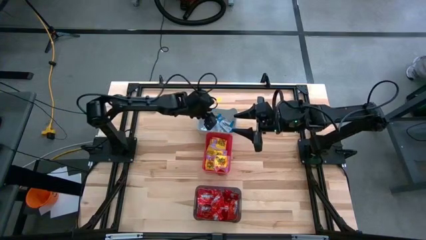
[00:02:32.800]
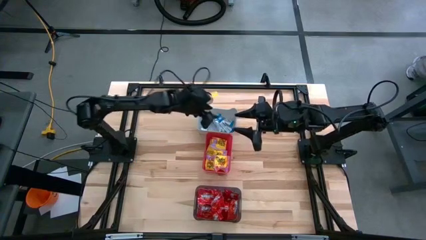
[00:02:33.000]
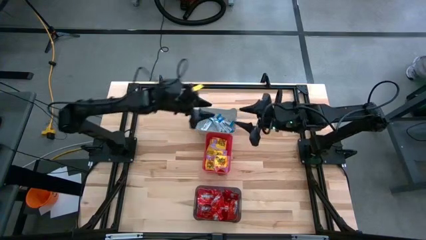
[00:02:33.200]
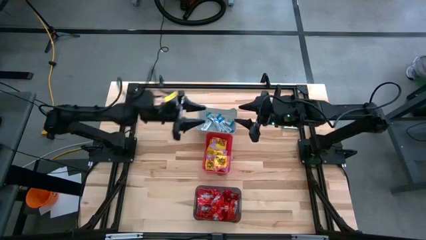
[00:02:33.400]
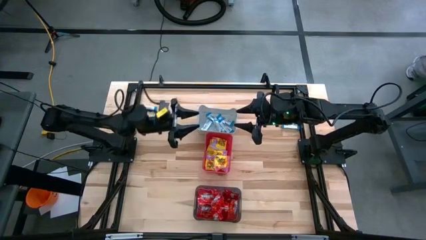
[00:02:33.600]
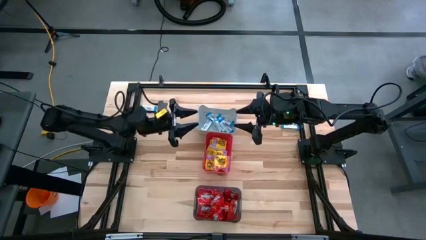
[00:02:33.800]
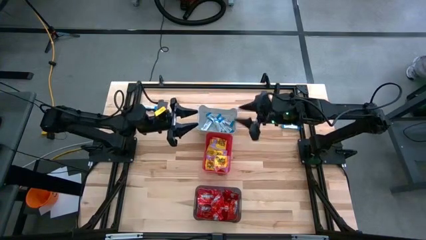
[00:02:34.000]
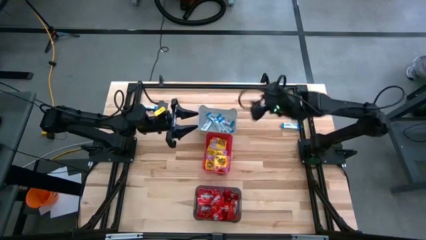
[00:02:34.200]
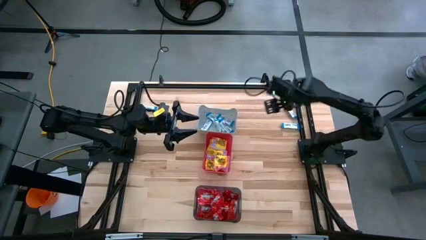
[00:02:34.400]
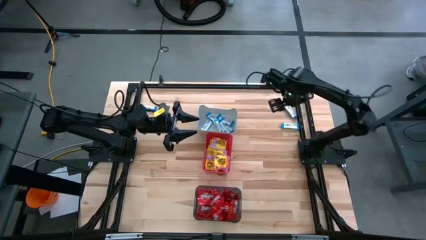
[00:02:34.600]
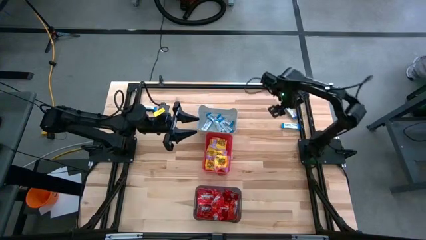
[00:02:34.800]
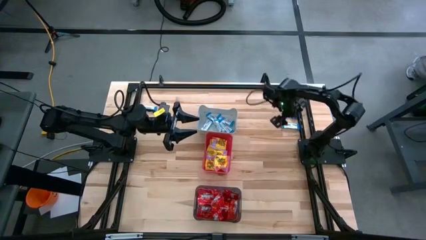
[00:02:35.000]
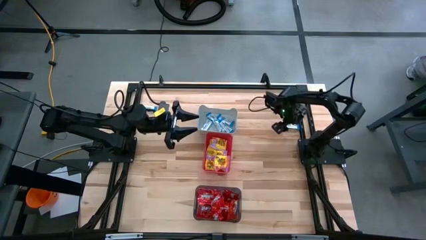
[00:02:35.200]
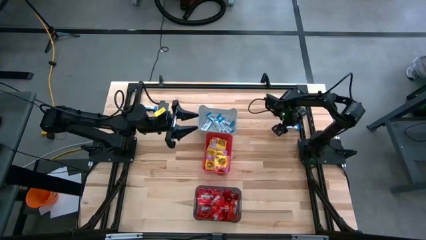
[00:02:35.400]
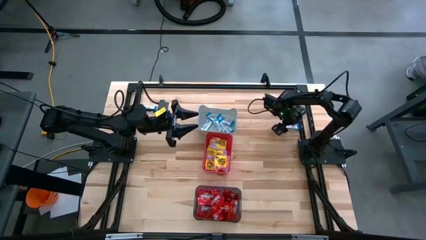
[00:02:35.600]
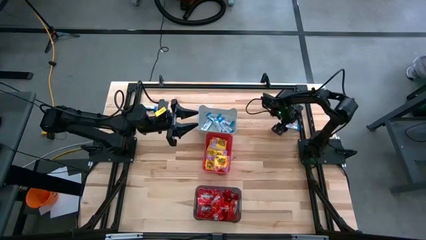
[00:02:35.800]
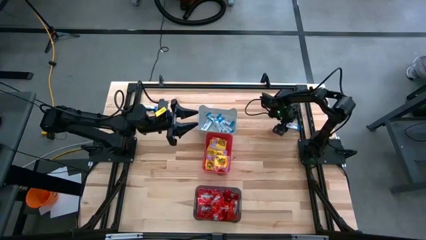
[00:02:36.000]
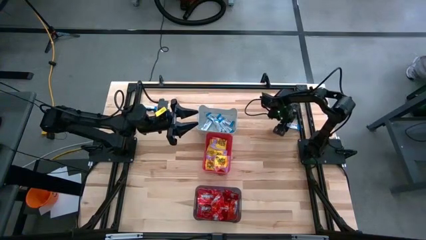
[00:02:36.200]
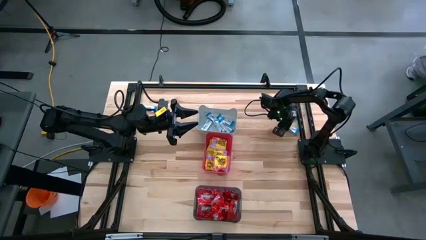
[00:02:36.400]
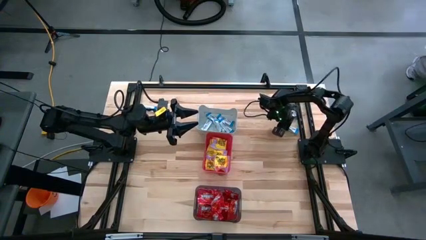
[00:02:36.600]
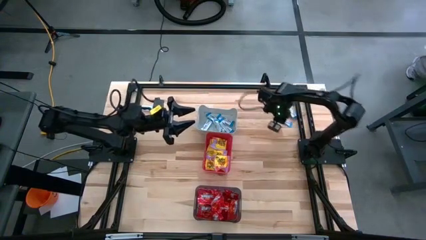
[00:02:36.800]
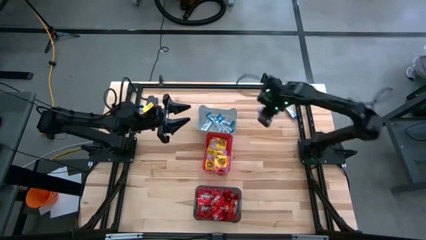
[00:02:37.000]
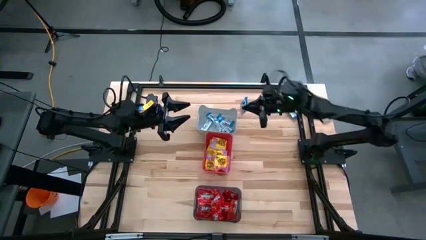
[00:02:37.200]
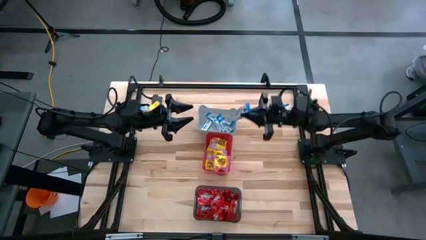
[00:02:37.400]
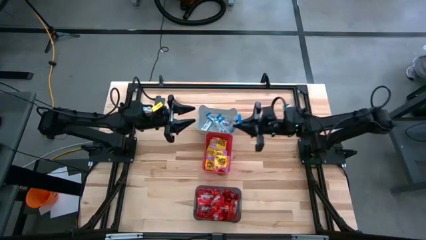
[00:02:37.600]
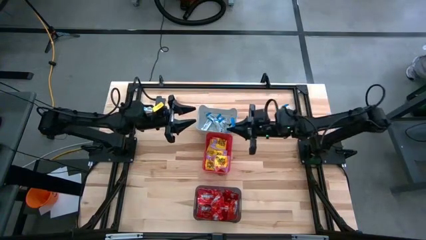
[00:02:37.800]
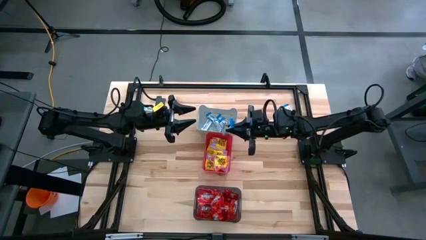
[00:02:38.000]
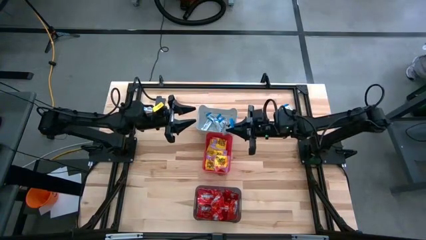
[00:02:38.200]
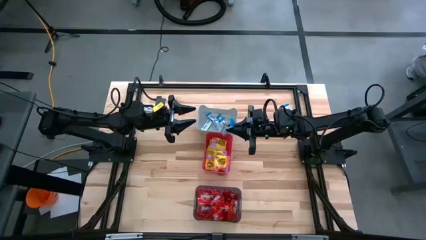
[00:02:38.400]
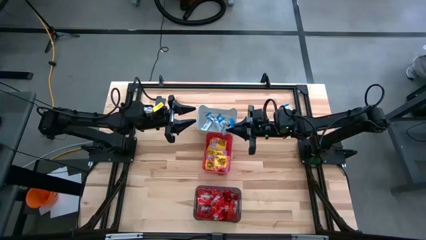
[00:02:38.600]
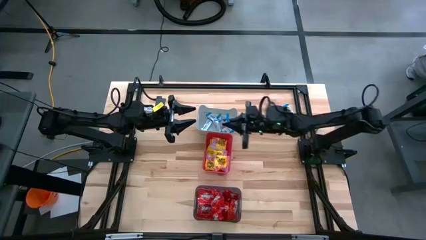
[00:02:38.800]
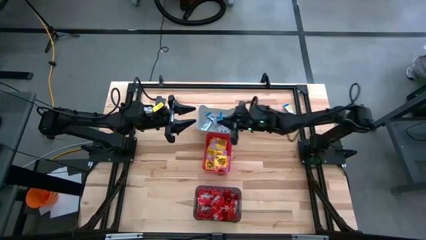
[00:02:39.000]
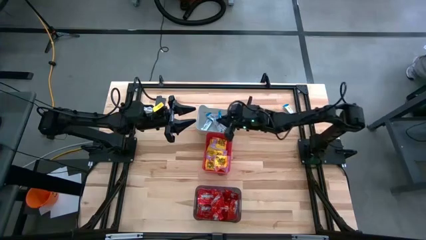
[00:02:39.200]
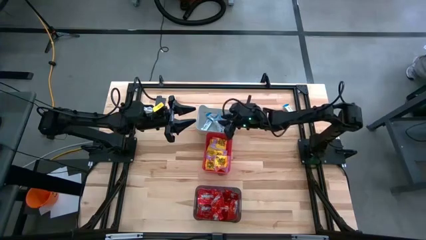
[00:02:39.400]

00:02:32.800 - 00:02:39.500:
Task: Sort candy
Put the white candy into the white bin

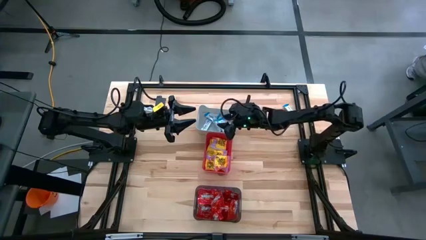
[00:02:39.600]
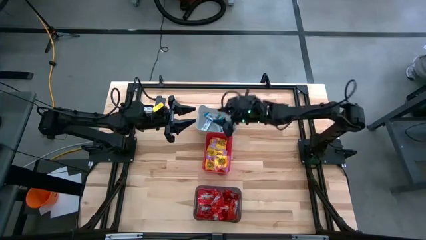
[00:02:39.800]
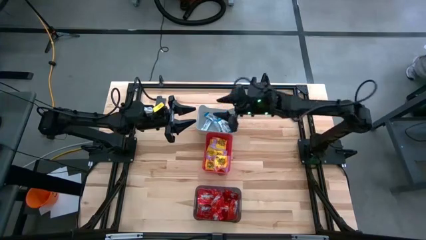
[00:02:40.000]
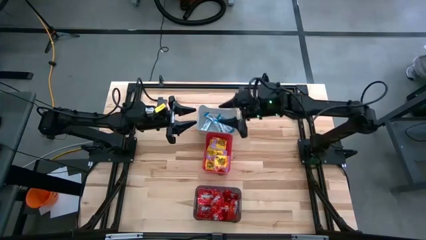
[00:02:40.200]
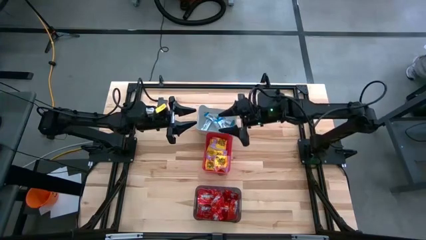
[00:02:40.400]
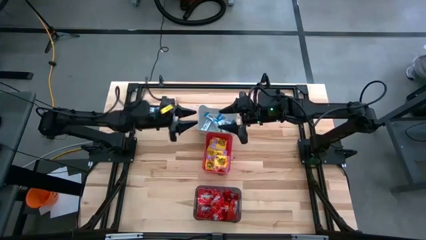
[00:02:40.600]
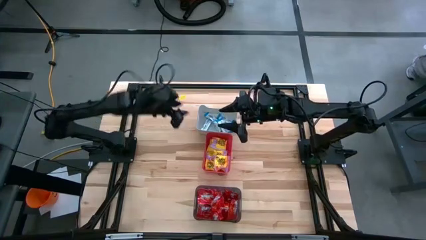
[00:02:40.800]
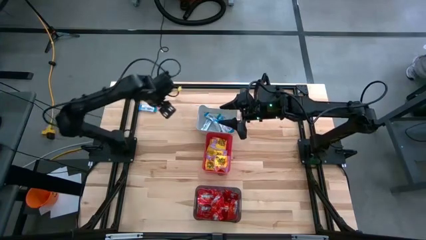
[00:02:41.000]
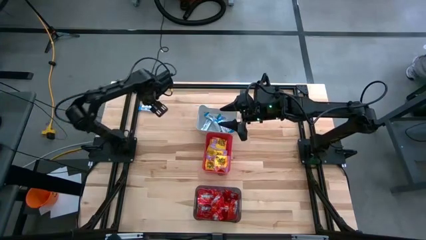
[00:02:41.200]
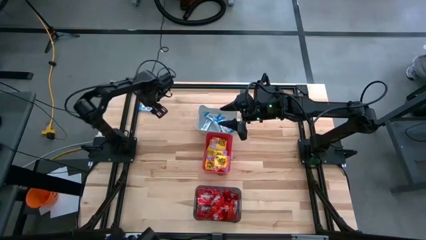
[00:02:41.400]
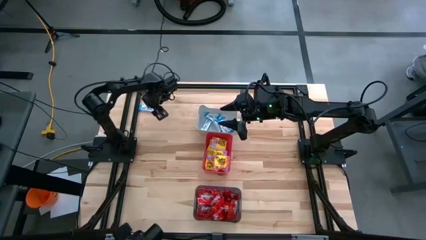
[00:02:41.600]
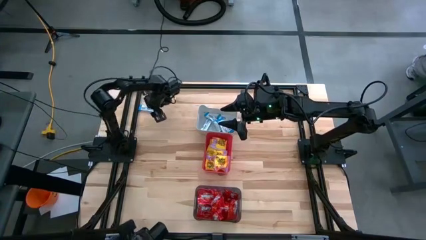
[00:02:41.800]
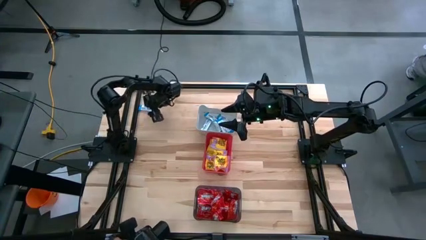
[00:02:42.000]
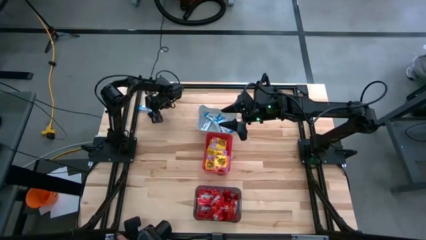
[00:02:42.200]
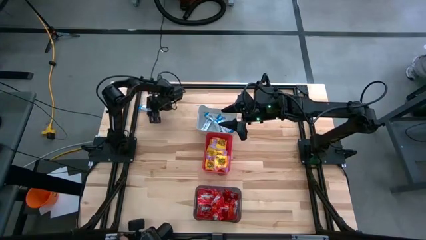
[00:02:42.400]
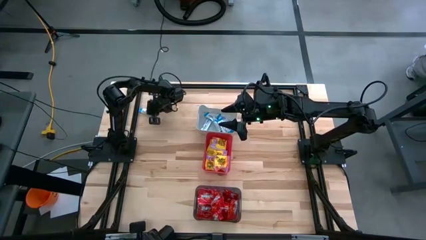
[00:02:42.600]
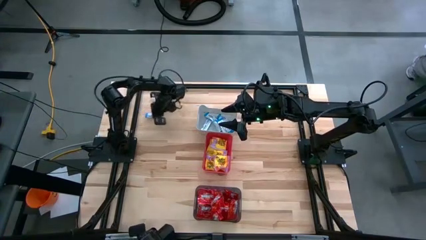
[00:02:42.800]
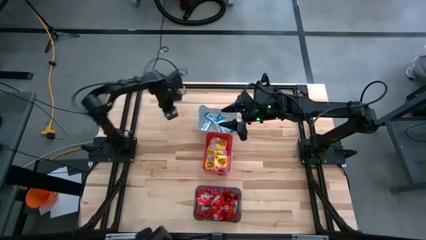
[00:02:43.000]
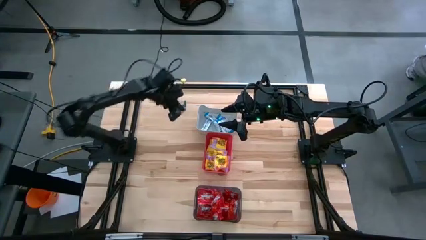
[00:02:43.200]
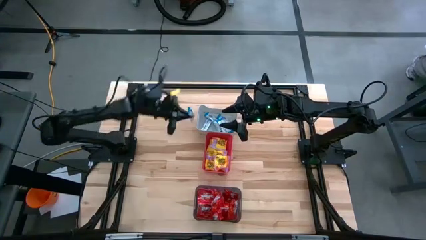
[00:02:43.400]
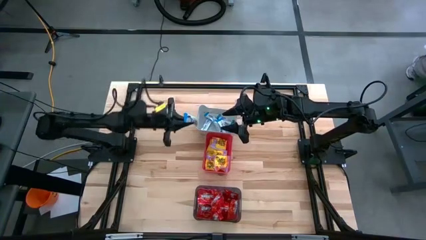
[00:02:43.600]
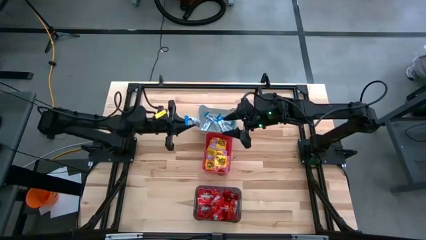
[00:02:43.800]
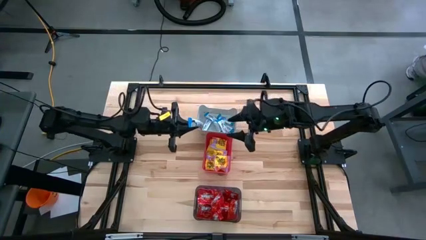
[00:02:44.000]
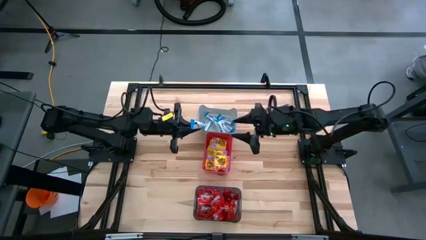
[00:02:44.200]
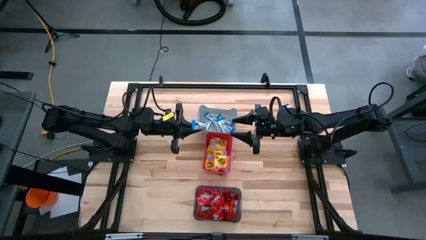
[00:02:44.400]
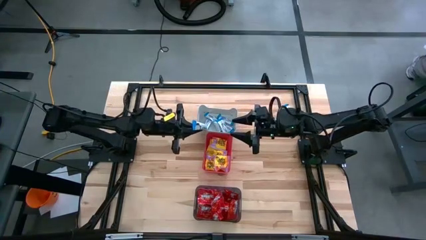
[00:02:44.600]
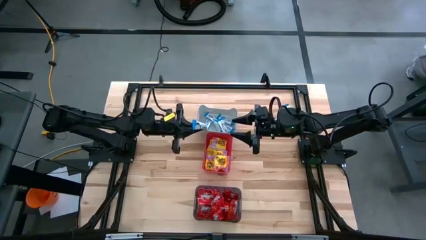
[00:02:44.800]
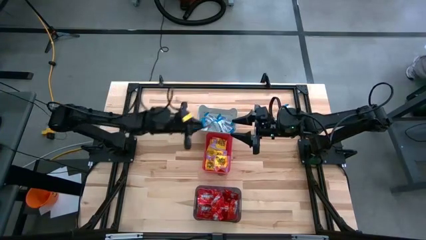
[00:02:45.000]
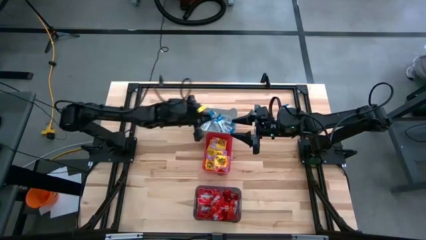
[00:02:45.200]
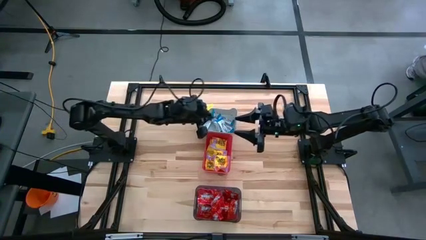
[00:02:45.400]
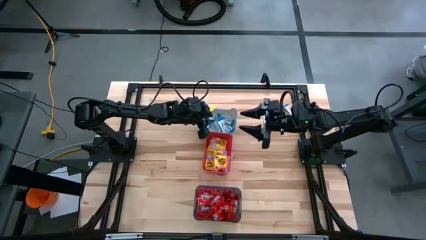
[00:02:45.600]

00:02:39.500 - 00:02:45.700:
Put the white candy into the white bin

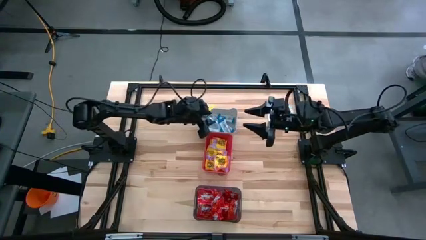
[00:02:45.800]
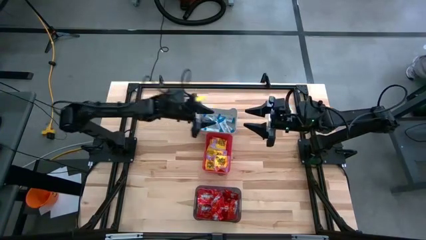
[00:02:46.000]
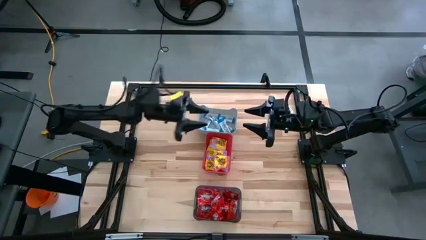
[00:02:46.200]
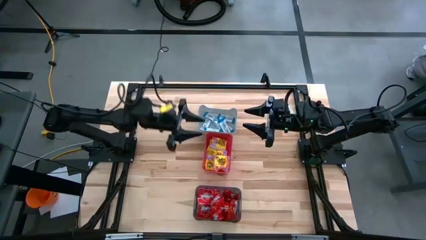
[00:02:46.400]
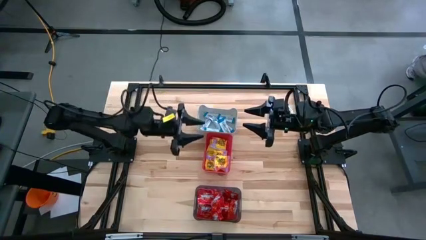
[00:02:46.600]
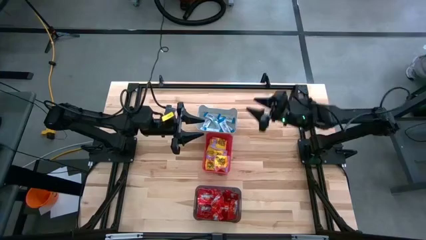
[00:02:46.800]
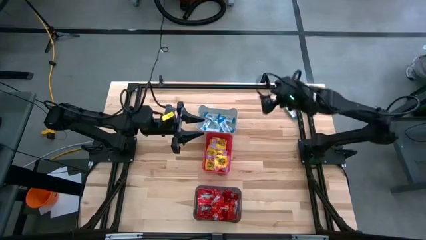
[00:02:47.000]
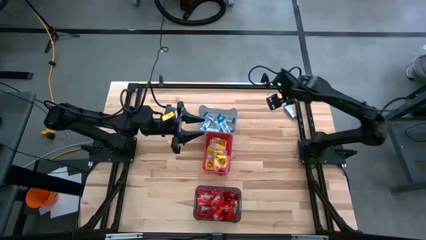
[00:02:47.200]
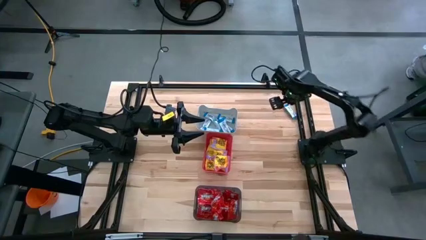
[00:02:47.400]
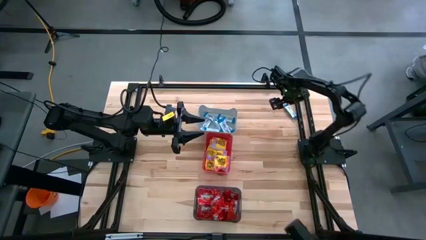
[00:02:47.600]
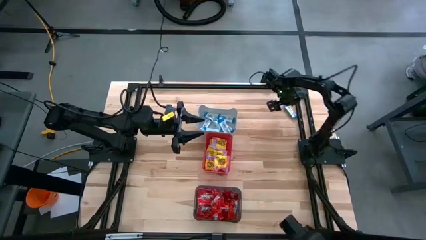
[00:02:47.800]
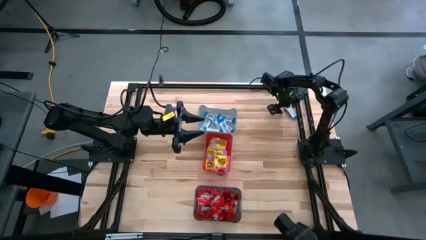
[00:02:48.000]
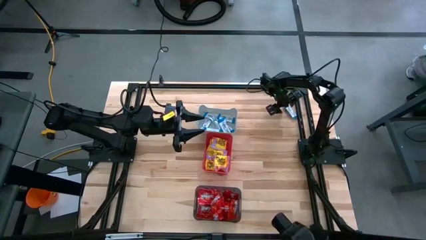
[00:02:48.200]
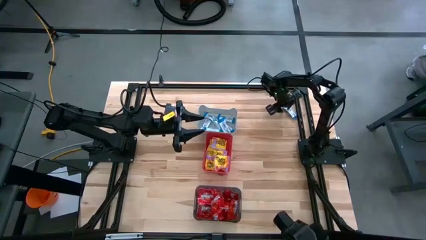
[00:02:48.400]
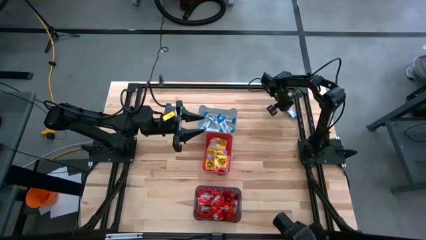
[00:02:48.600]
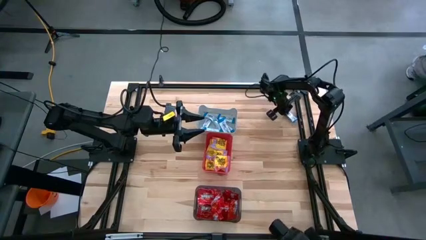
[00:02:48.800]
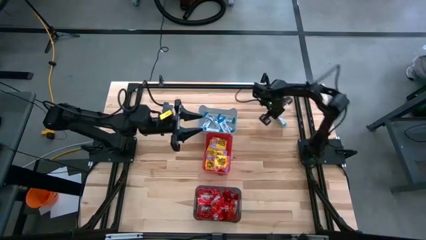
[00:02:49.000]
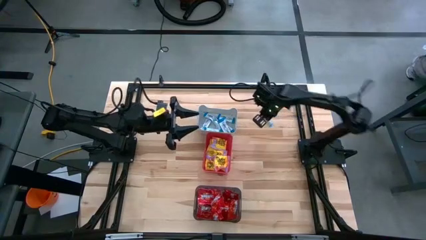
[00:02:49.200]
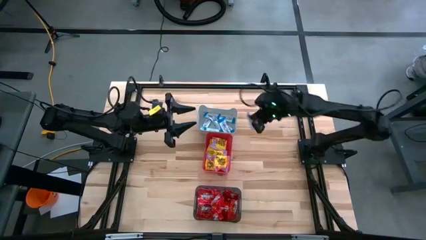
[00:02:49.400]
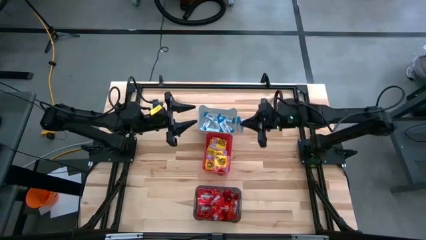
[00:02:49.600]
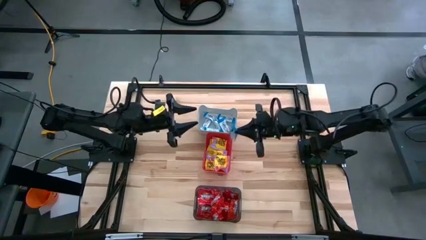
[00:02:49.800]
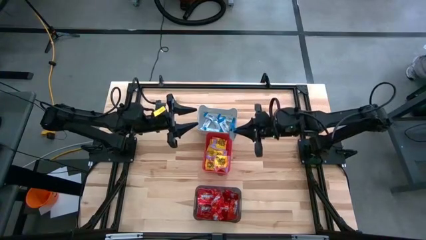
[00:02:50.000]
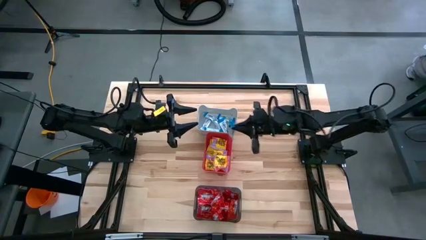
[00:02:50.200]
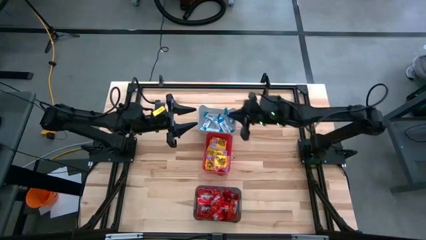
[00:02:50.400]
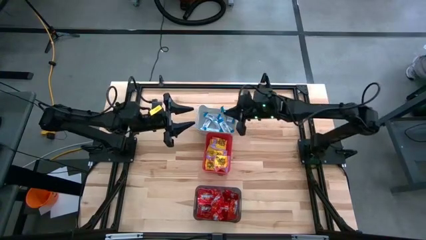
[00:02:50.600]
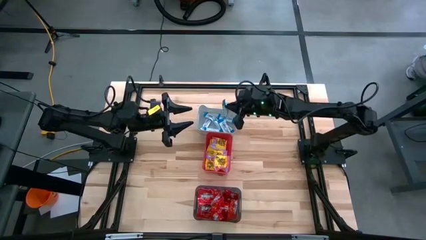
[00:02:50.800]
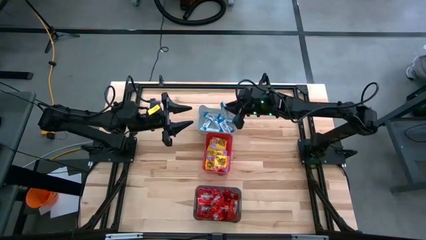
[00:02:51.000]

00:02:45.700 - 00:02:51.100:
Put the white candy into the white bin
